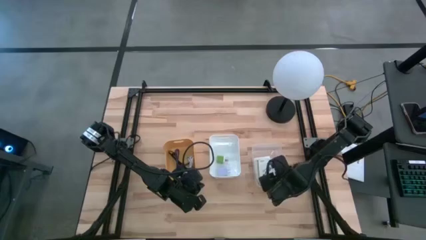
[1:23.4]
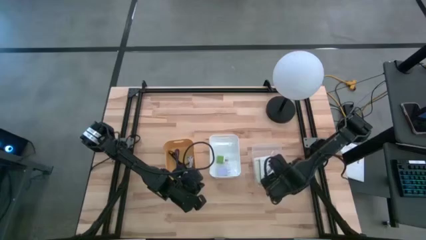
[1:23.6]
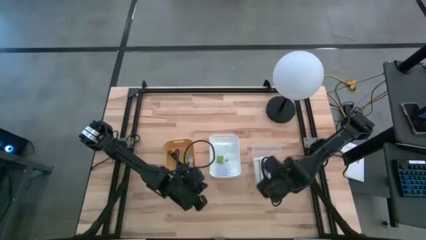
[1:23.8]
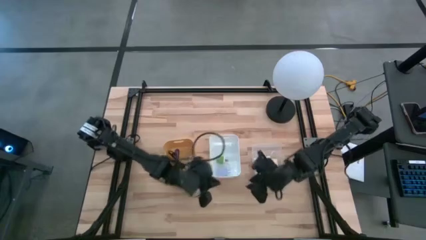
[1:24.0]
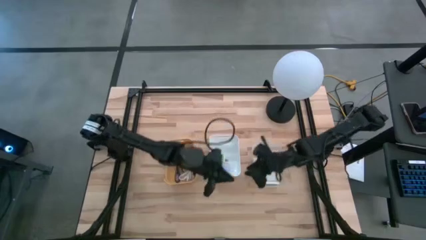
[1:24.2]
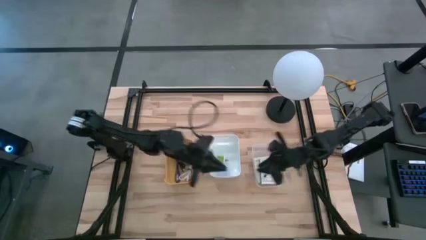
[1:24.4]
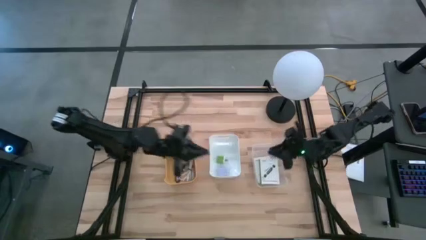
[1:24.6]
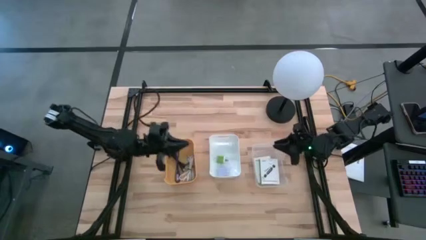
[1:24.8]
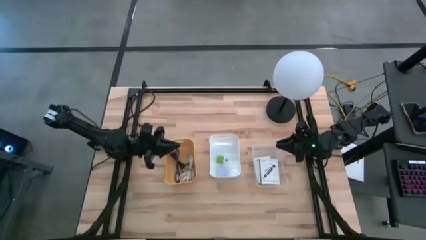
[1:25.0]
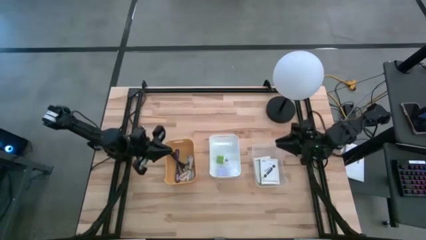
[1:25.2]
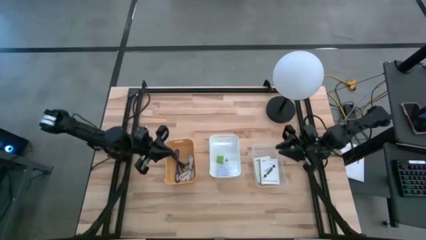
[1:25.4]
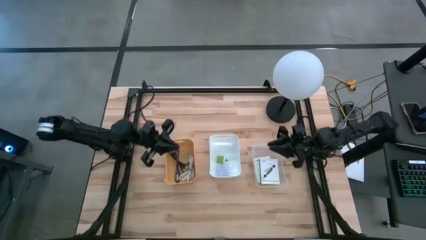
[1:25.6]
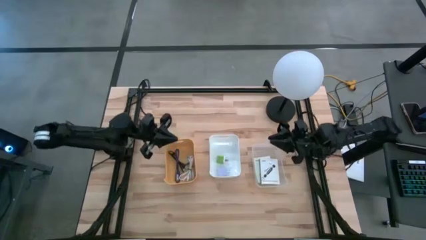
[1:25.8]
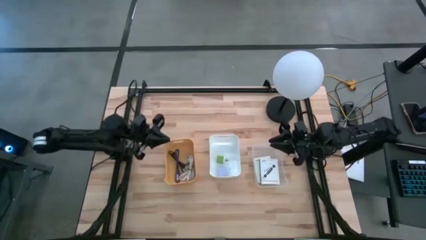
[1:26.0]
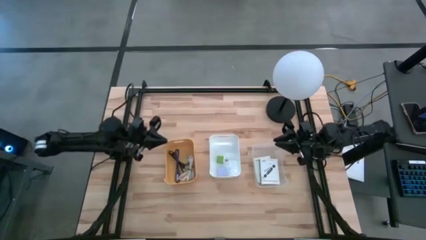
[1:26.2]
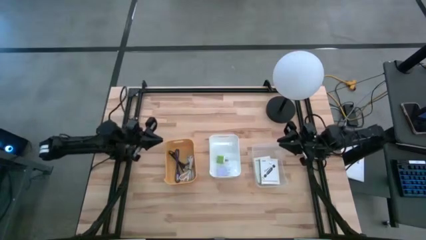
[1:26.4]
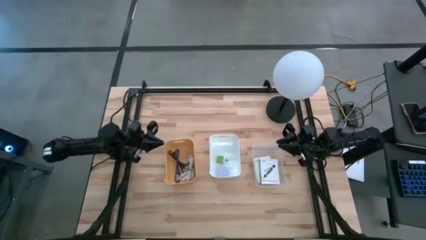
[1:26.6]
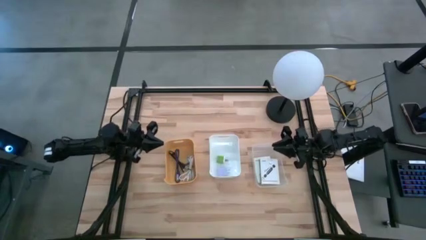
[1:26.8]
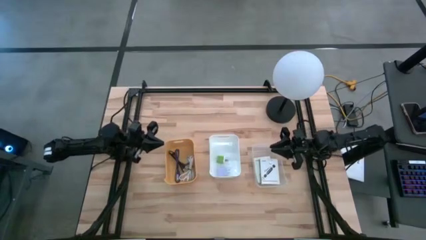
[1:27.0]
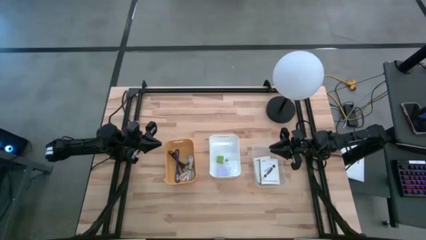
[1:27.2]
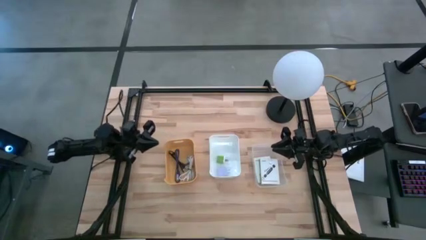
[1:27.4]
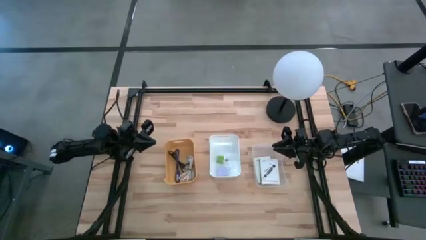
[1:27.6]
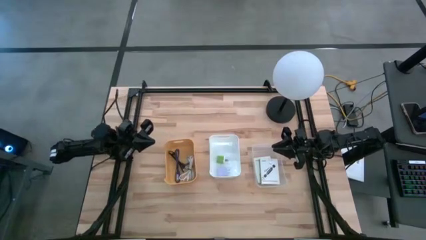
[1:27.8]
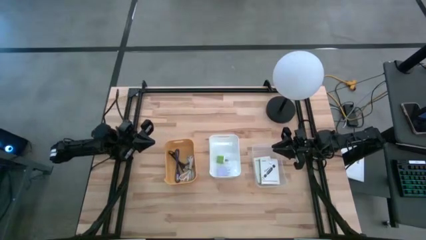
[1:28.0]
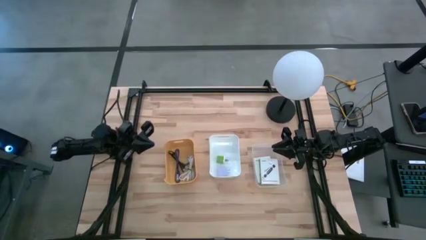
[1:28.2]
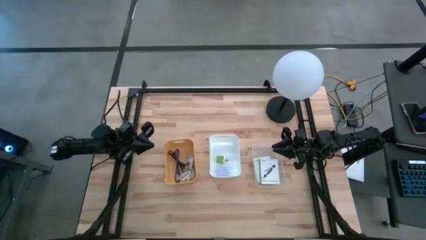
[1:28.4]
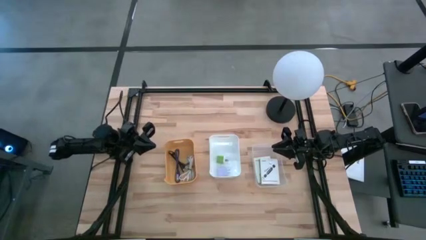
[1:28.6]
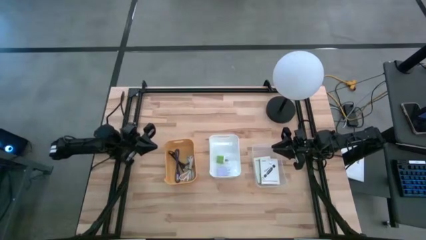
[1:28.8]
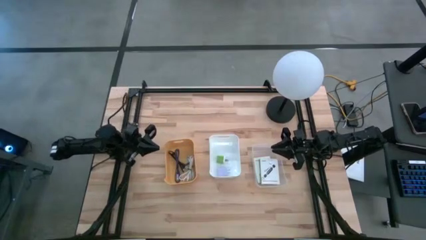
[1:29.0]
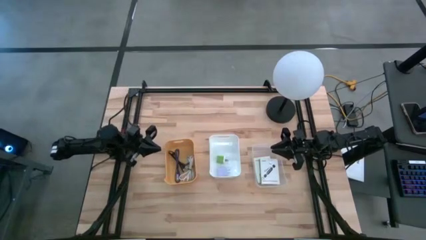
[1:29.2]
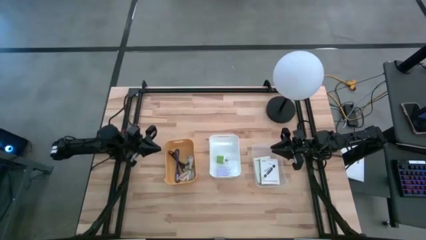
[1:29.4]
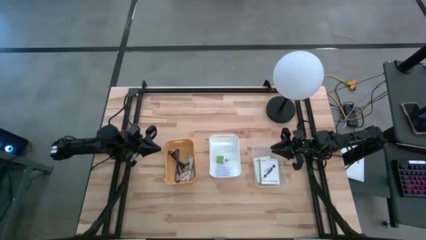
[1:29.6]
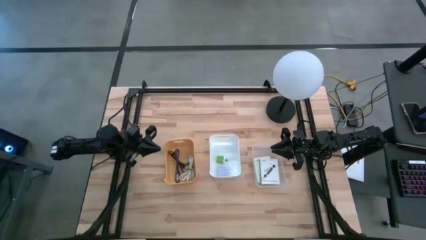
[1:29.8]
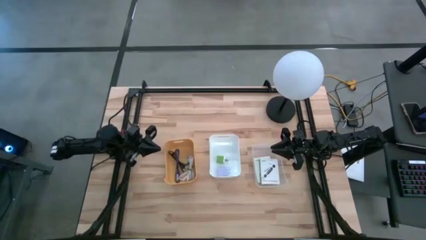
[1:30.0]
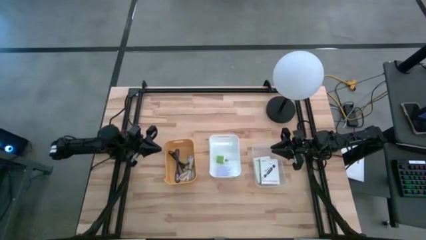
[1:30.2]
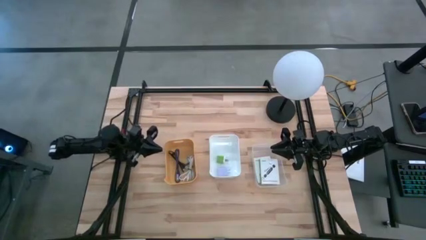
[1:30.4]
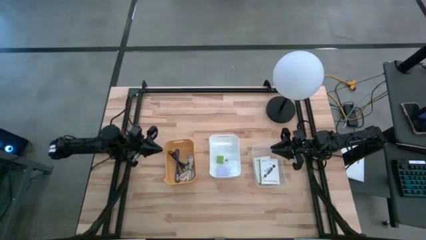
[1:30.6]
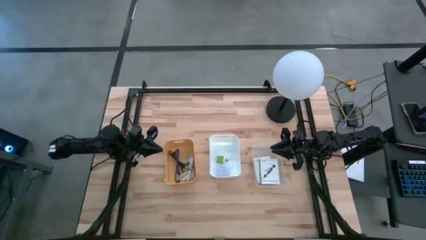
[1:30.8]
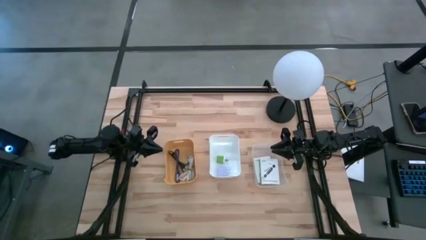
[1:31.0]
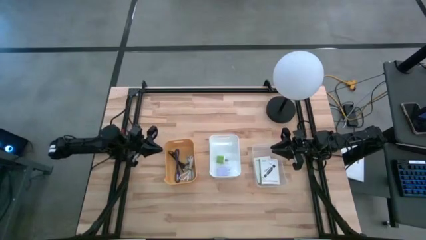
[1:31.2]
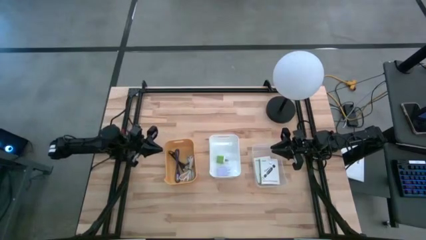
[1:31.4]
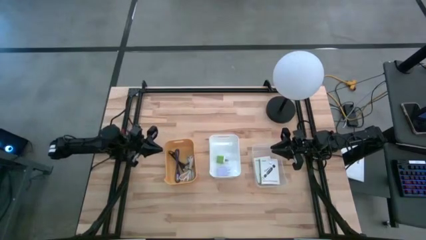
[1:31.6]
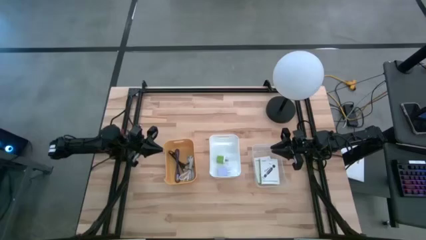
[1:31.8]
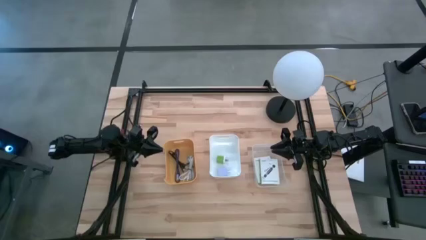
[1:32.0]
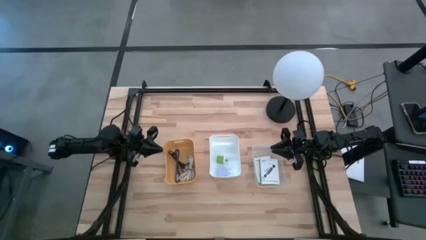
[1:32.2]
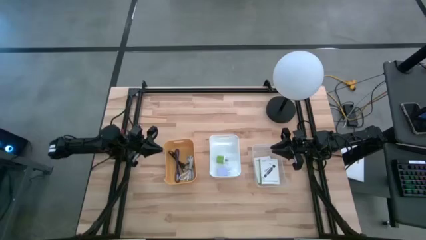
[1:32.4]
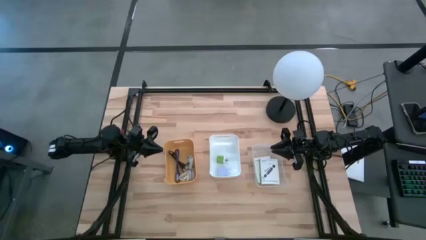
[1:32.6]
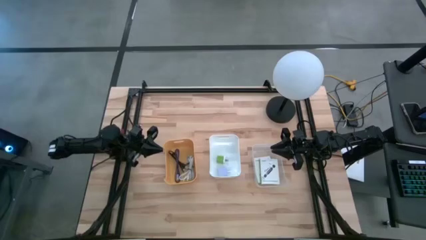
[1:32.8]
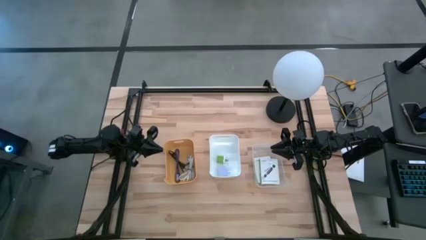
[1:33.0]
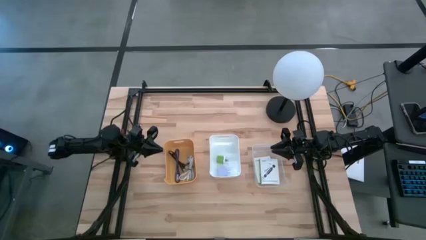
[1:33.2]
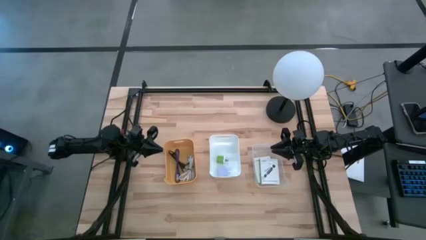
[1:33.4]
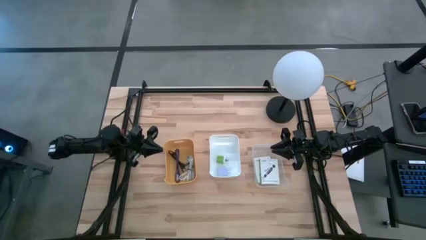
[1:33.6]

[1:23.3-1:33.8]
Task: Pick and place items into bin
Return to Home Position

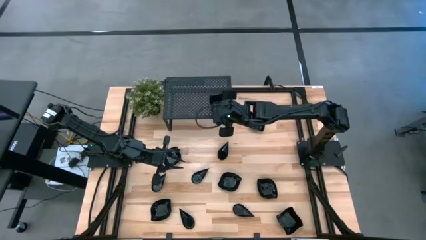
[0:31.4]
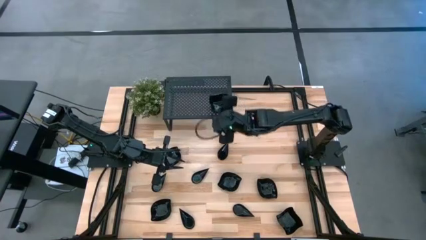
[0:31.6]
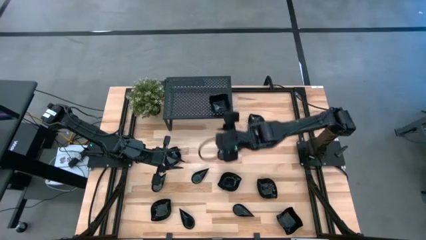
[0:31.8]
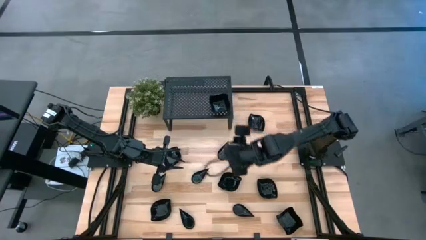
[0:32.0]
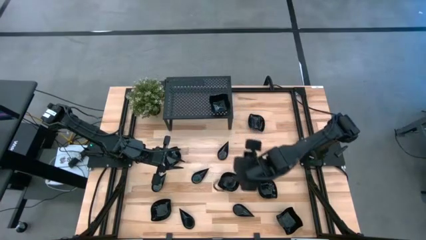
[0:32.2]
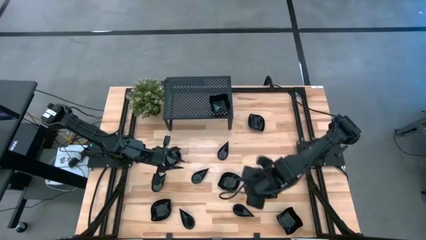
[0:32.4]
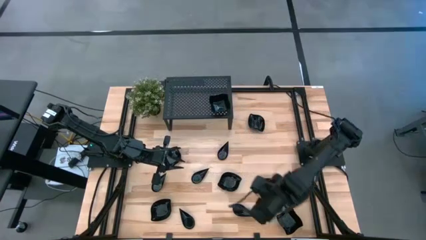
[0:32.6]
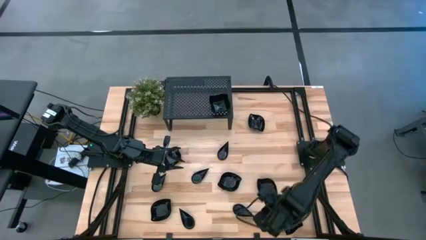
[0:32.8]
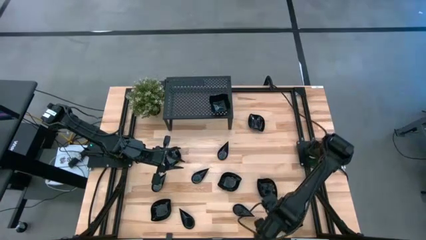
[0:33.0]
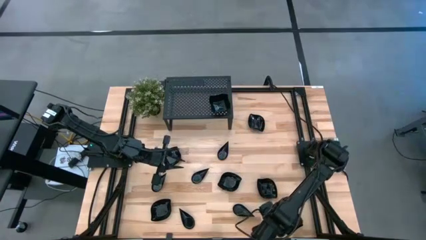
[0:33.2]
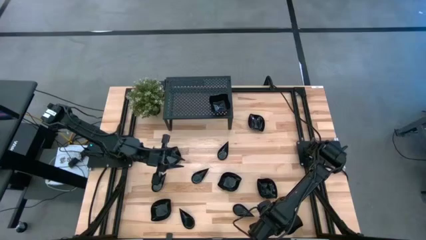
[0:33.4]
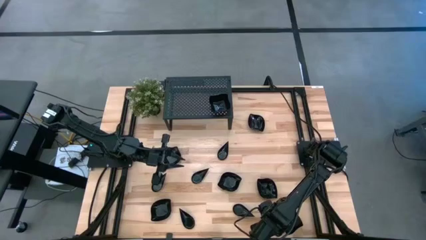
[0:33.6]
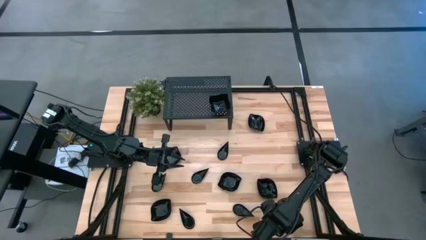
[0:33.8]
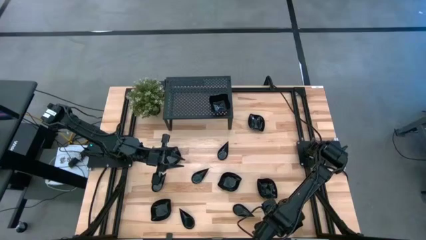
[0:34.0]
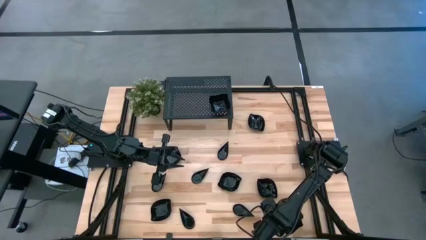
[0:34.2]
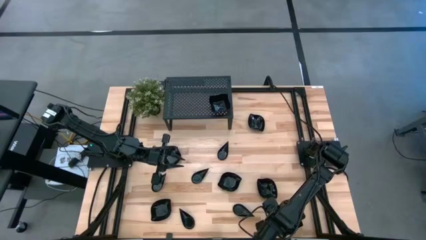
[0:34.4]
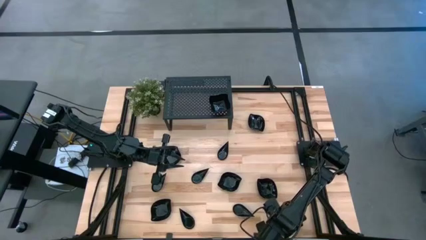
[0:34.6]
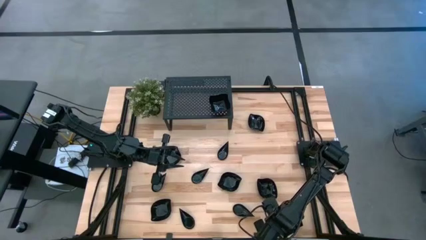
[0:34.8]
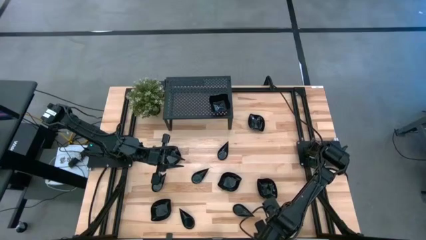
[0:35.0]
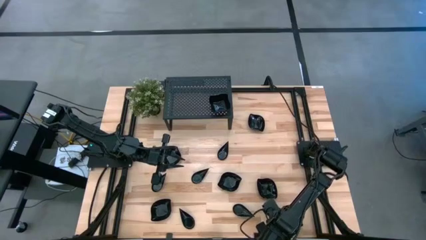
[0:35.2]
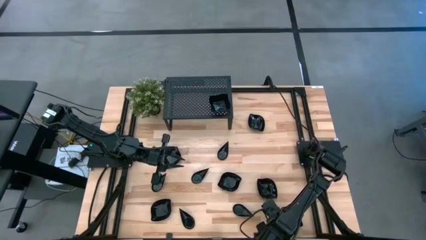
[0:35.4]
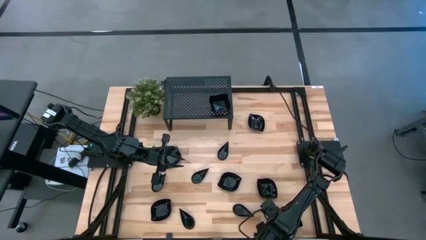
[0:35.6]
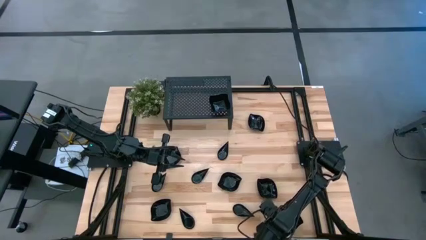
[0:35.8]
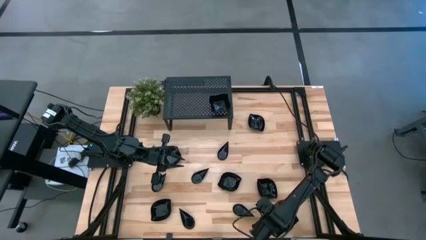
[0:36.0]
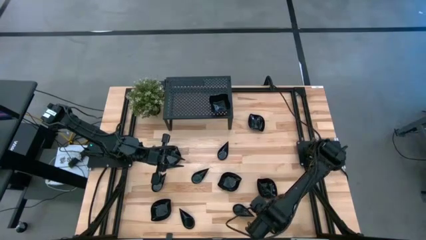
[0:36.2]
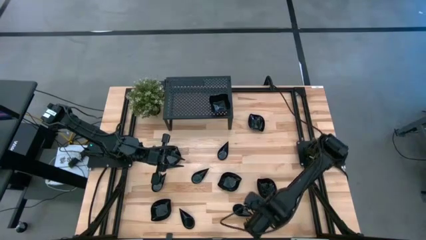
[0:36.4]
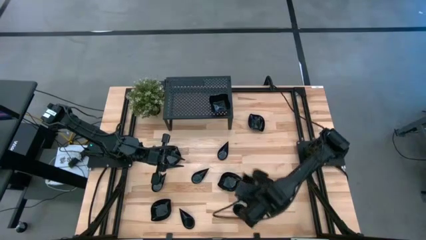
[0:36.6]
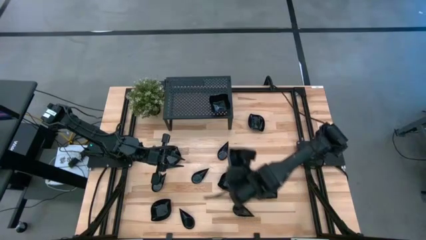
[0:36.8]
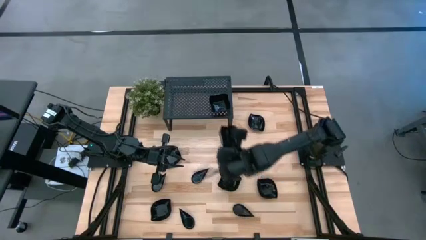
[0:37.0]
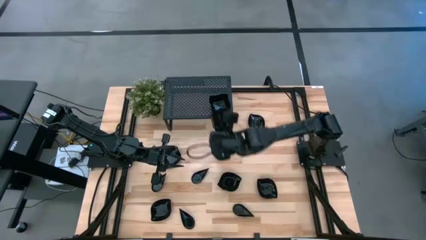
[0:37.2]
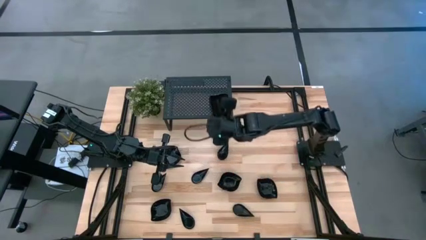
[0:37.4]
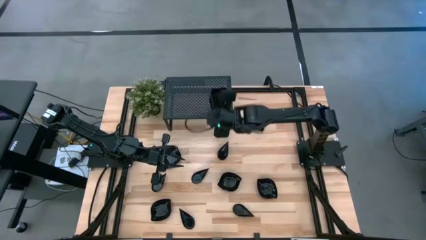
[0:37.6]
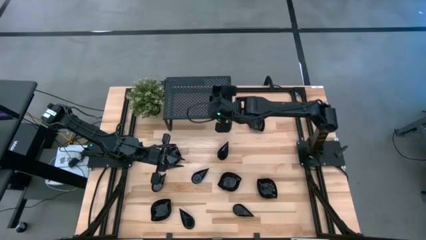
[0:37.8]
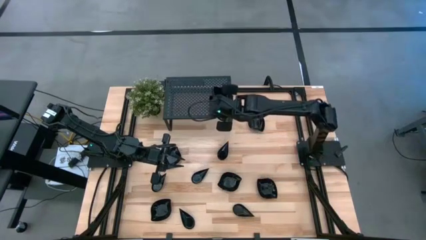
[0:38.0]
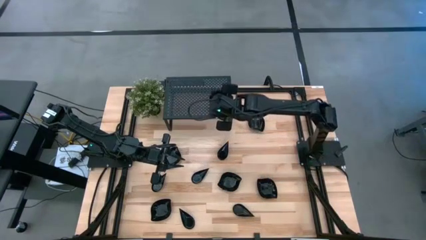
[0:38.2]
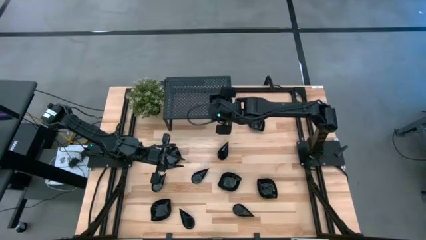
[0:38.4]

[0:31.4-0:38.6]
Task: Pick & Place Mini shaped plates
Stack the black distorted square plate on top of the black distorted square plate on the shelf
